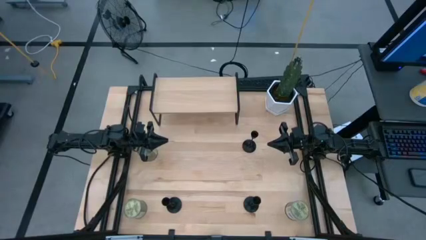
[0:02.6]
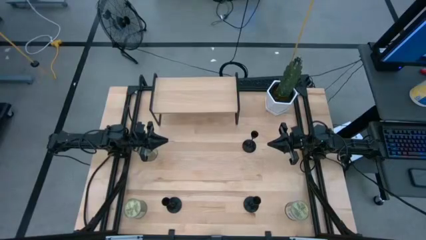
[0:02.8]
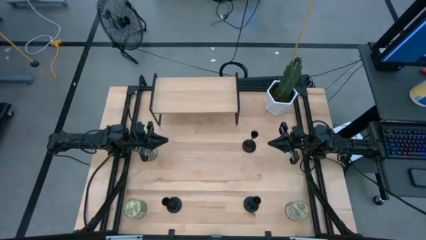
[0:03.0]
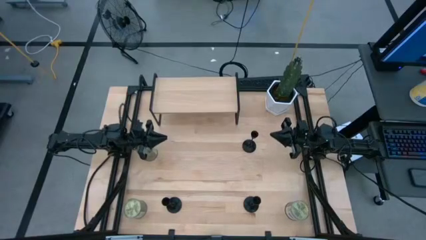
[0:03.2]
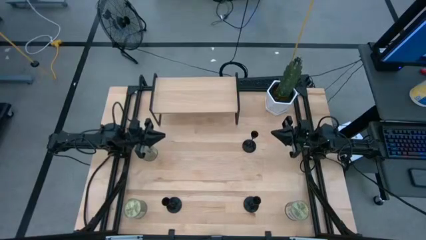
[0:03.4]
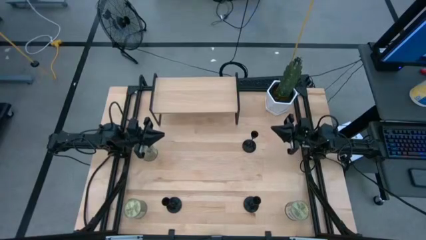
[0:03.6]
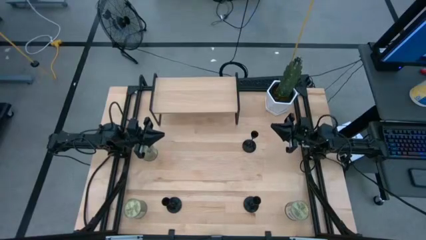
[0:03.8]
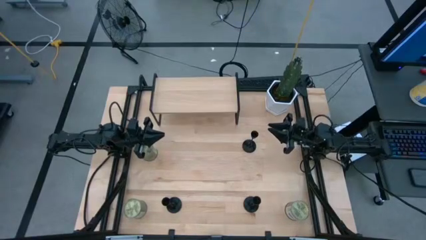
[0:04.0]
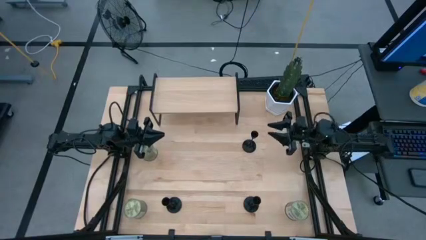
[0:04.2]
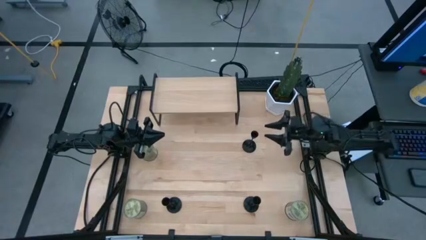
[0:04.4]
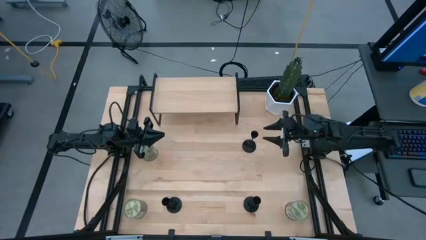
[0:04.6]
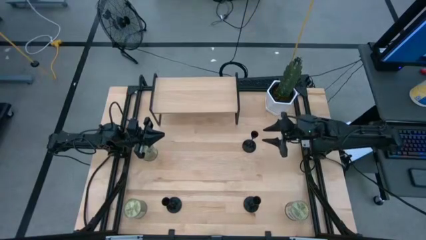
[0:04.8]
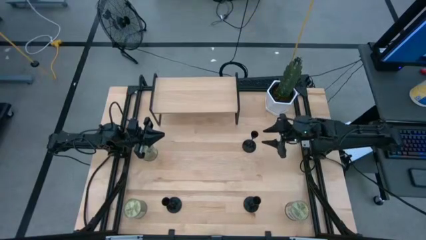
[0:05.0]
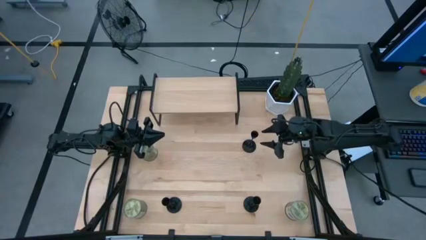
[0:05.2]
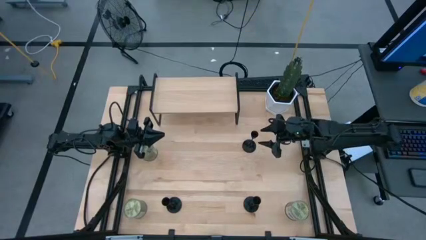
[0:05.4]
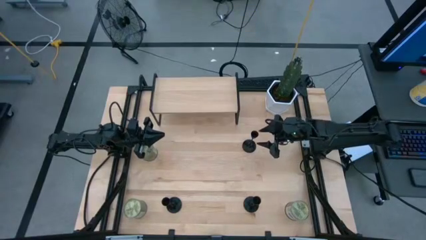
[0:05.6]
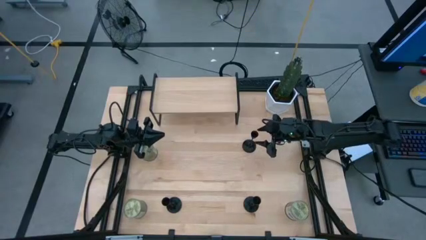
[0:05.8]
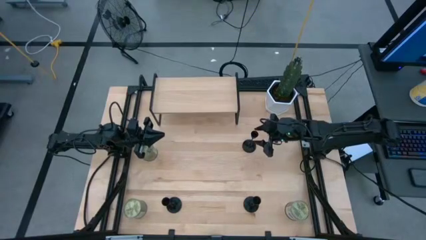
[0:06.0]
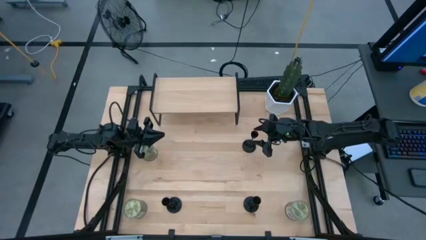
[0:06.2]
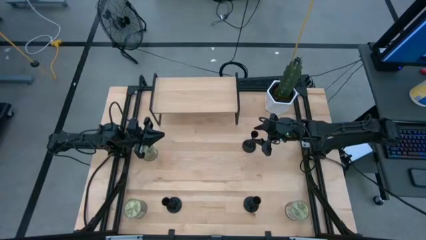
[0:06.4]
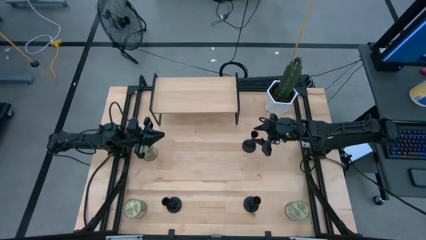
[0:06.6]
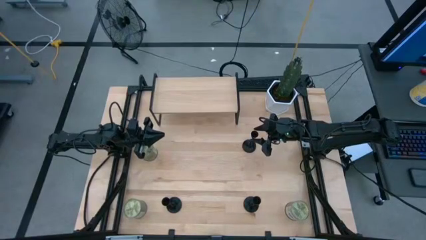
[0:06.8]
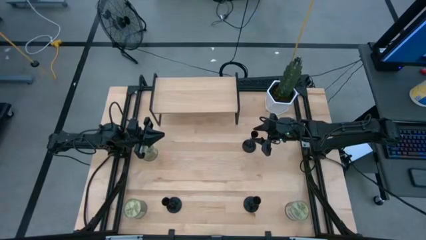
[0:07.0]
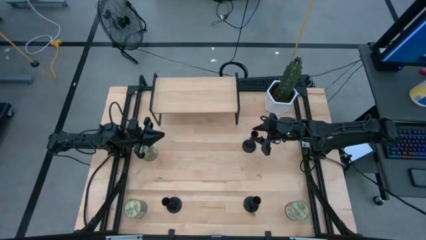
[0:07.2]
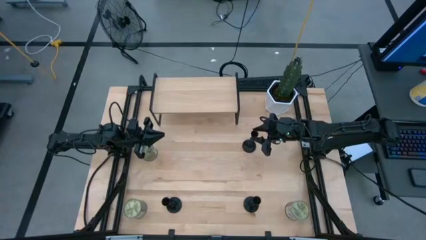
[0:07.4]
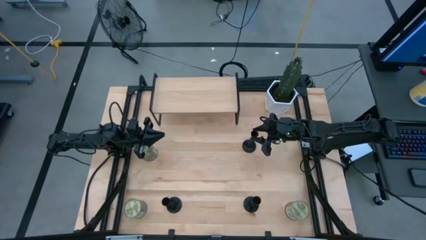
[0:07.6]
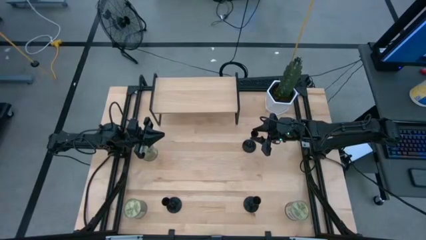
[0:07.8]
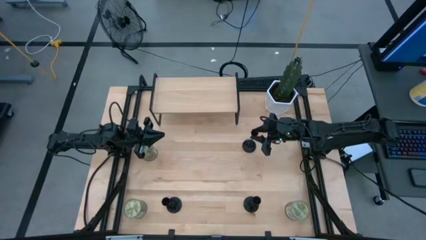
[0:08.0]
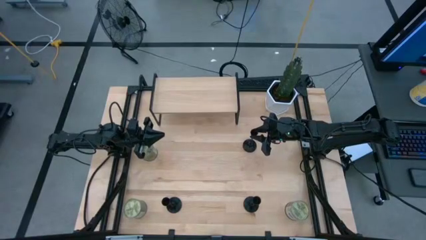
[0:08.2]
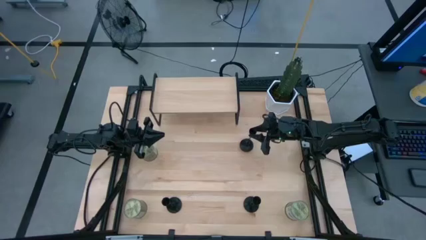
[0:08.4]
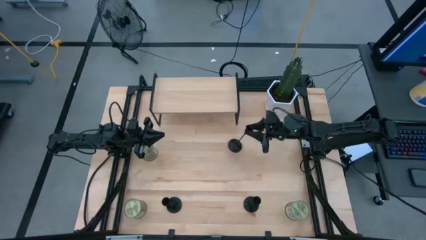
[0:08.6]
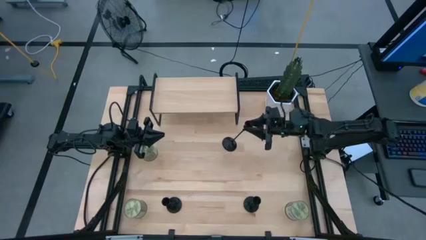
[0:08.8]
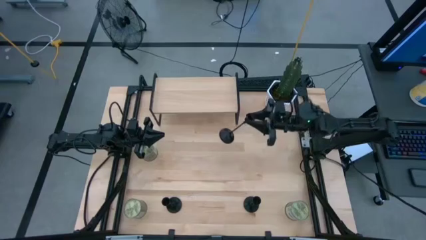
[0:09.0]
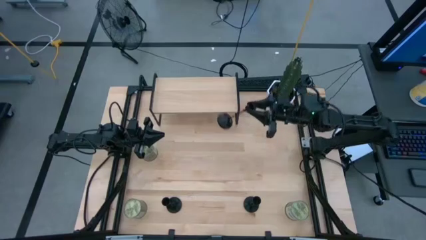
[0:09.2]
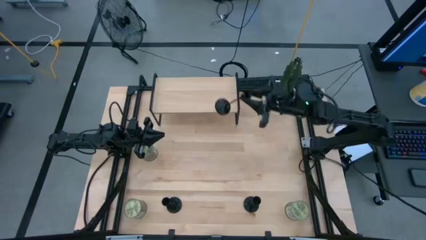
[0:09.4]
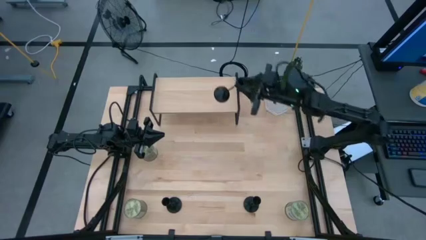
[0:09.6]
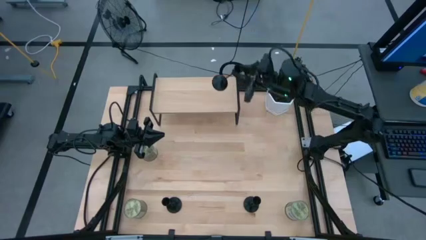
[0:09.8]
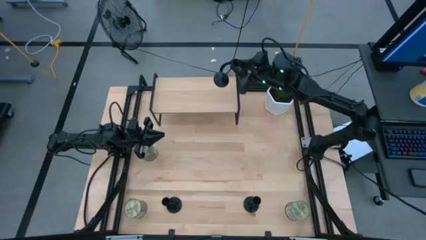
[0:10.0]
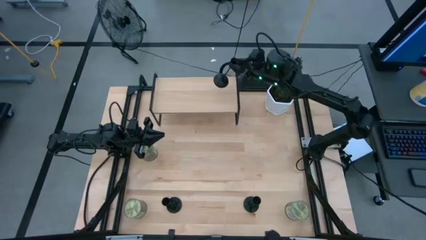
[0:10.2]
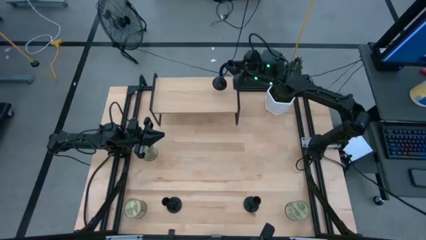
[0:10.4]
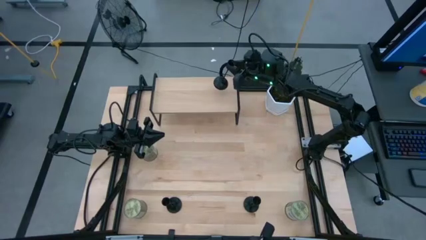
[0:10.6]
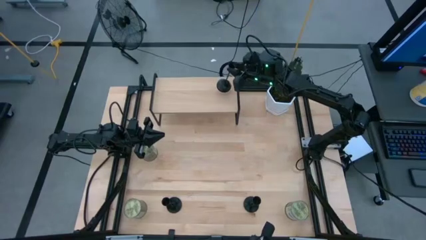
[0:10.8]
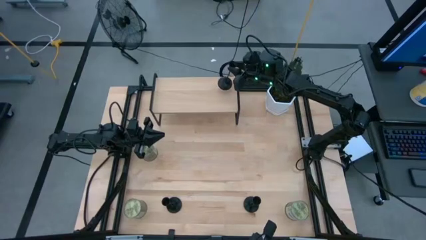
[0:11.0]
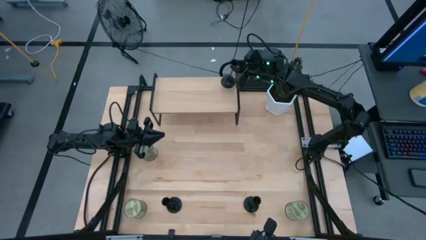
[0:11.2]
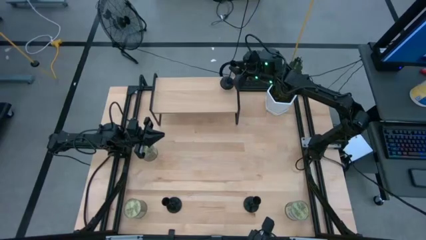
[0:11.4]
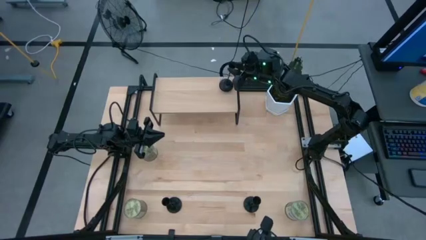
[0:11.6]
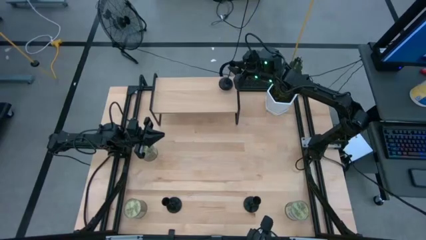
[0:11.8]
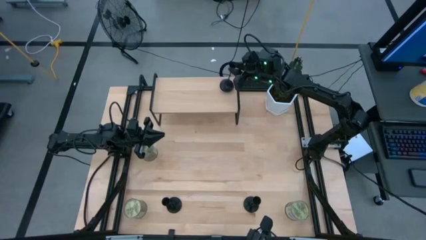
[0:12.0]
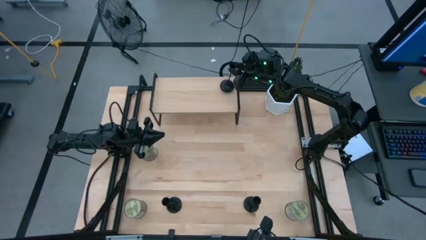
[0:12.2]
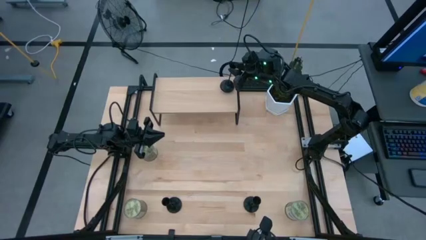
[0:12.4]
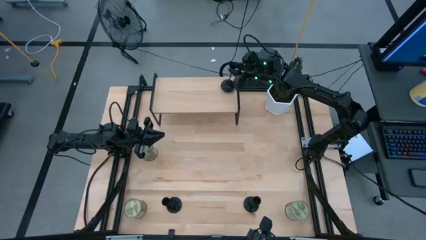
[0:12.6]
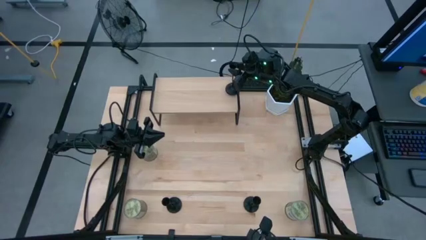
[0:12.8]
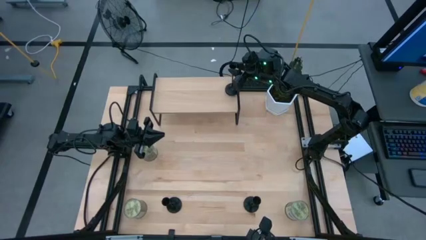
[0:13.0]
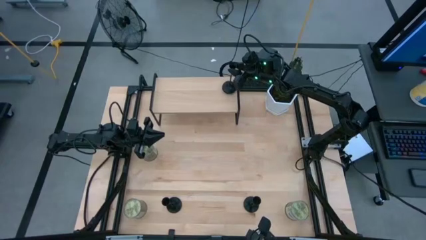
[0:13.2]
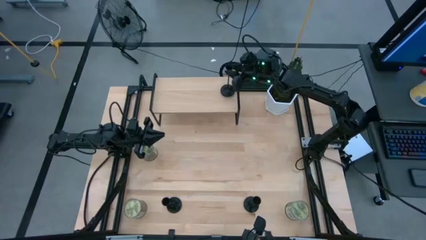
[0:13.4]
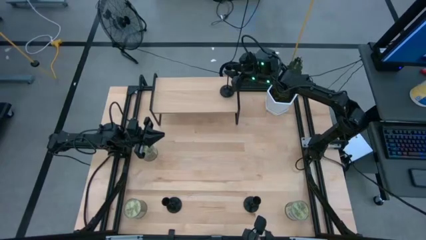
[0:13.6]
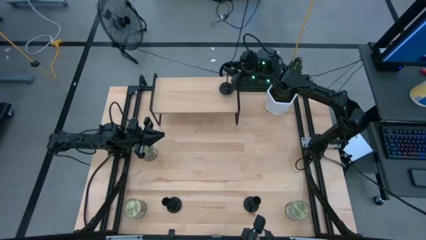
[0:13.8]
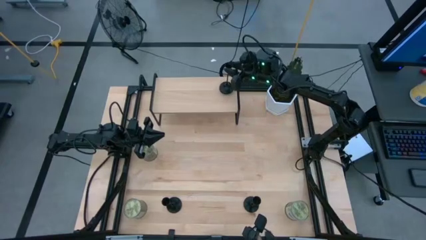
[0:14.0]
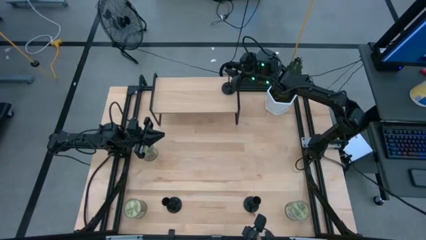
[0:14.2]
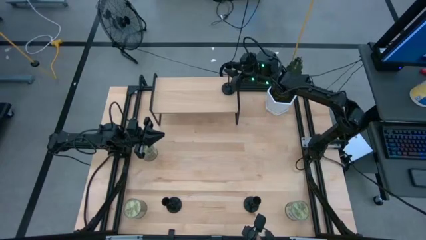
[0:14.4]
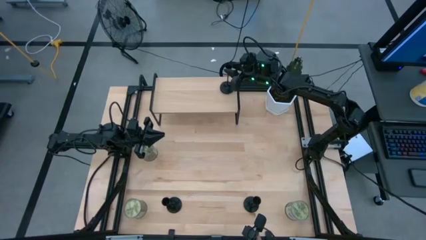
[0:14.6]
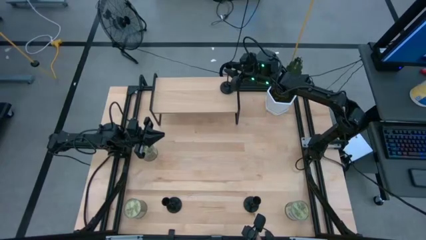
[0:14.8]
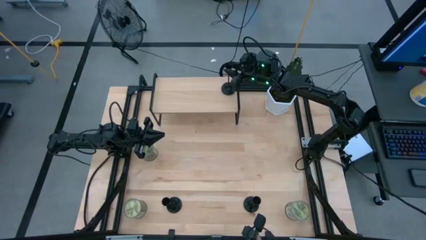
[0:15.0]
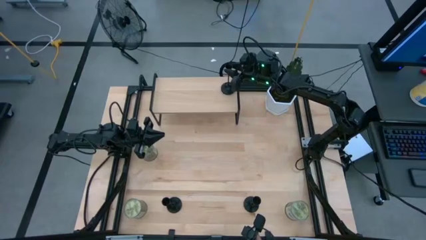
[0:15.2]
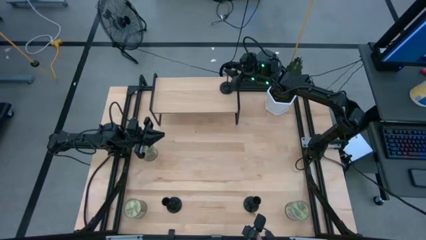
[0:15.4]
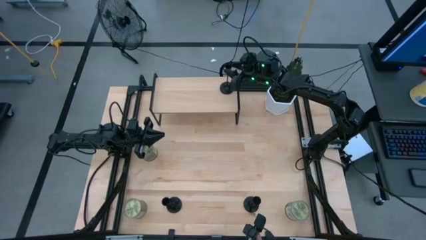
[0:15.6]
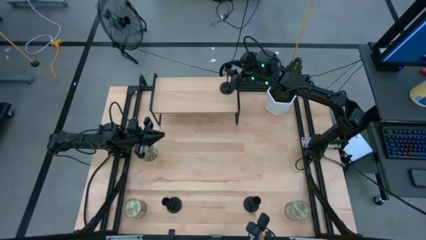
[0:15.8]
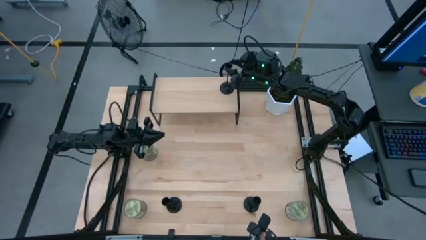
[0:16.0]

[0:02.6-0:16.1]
Task: Pick & Place candle stick holders
Put the top black candle holder on the shelf
